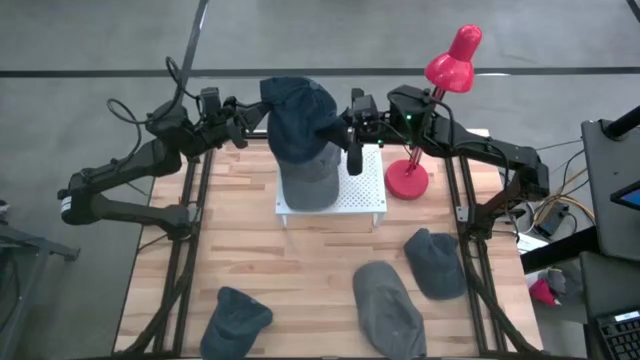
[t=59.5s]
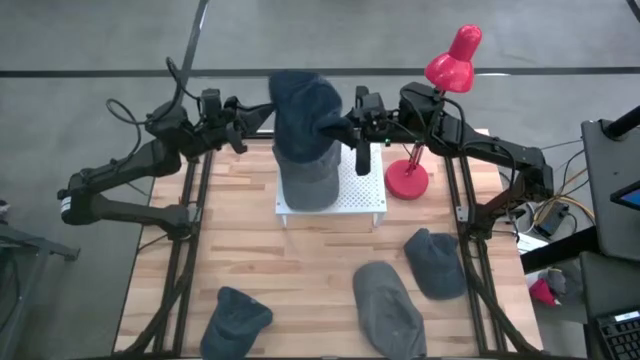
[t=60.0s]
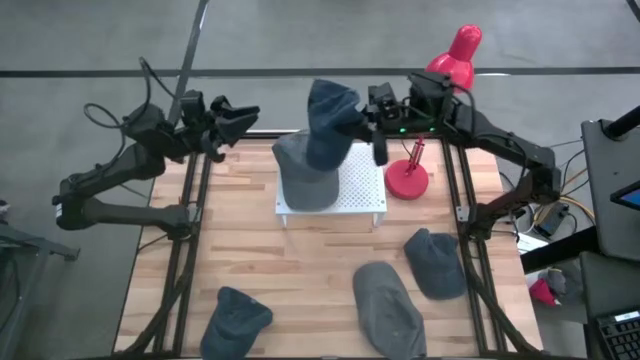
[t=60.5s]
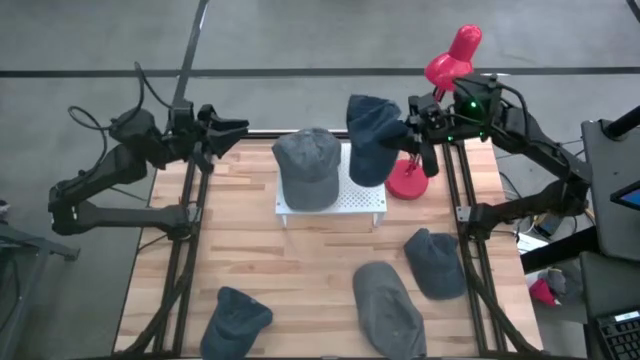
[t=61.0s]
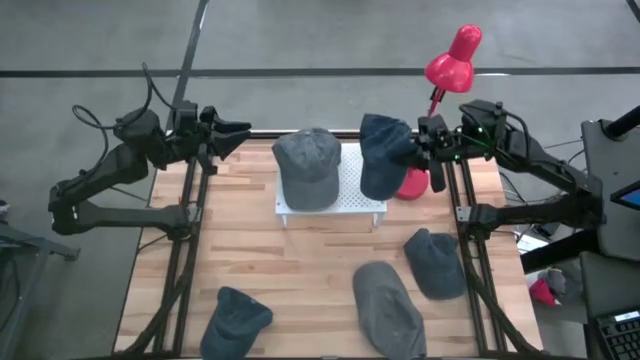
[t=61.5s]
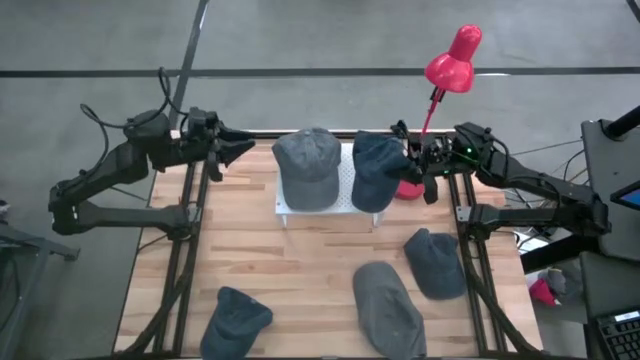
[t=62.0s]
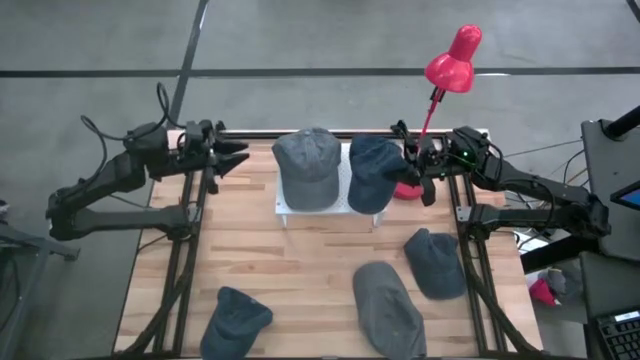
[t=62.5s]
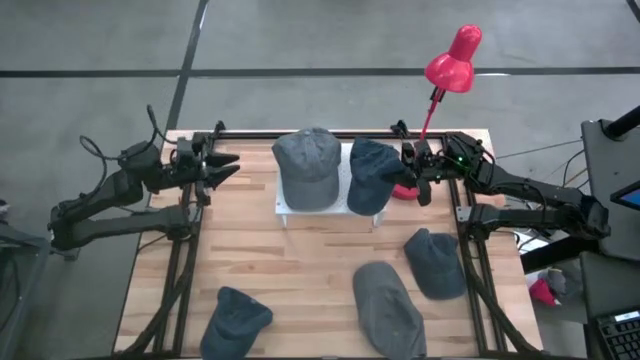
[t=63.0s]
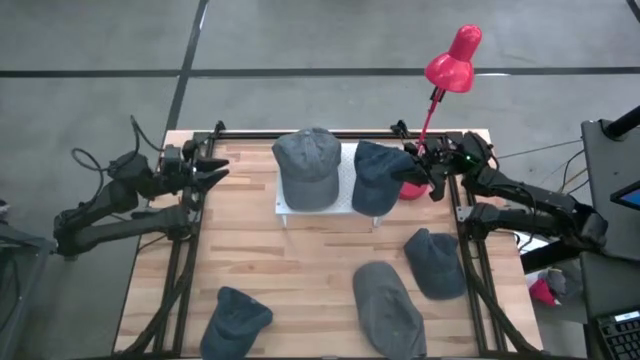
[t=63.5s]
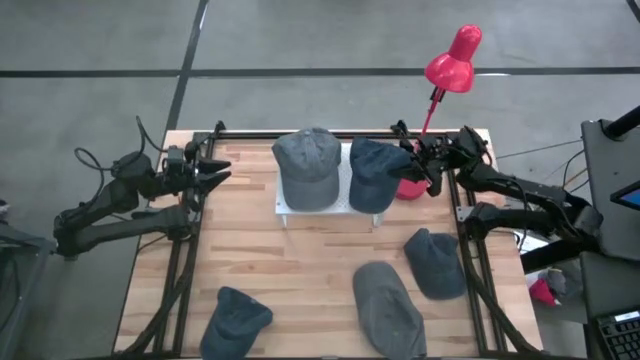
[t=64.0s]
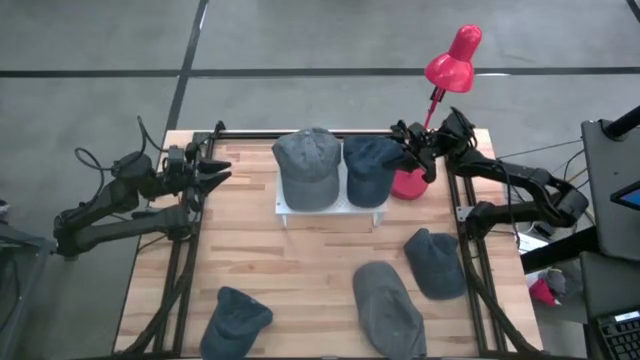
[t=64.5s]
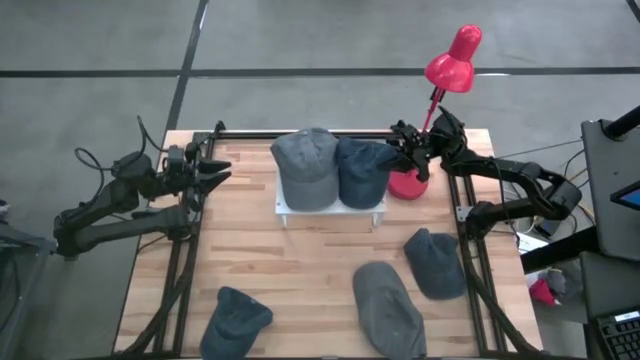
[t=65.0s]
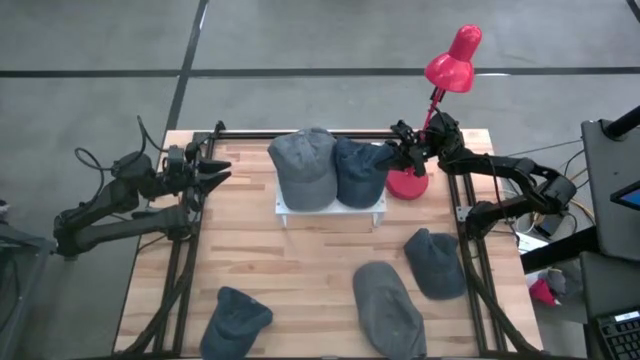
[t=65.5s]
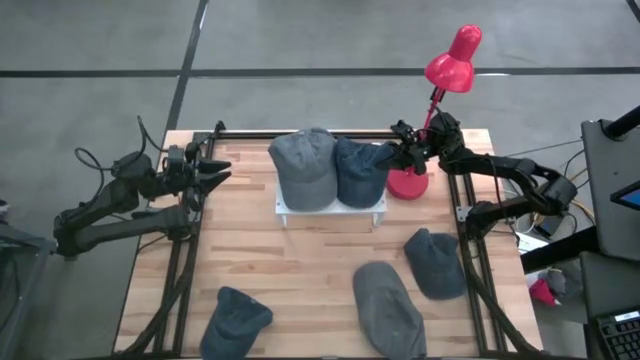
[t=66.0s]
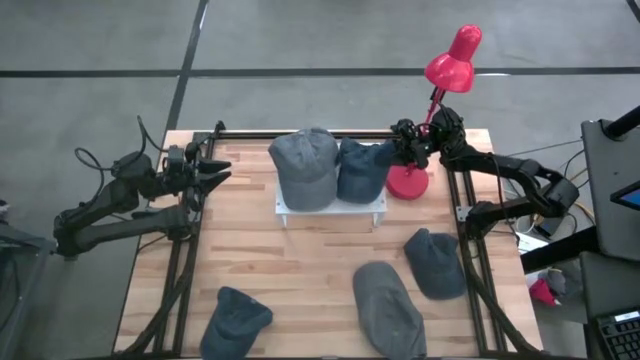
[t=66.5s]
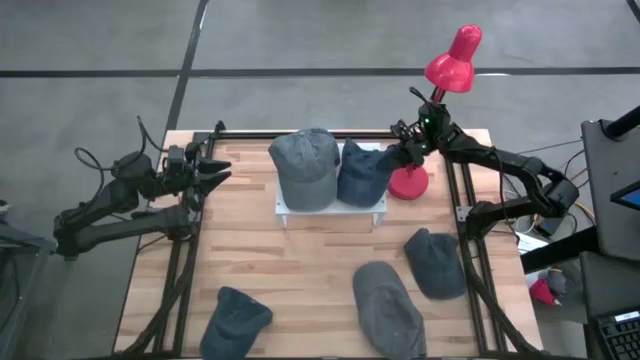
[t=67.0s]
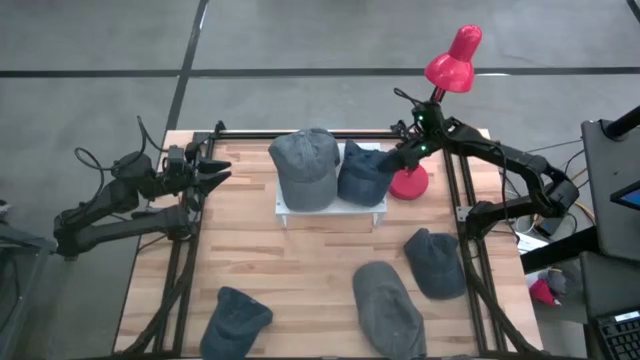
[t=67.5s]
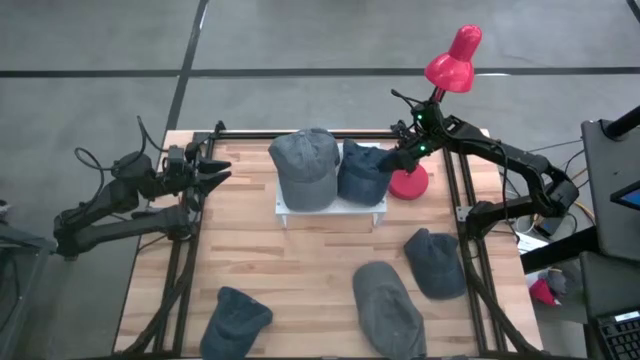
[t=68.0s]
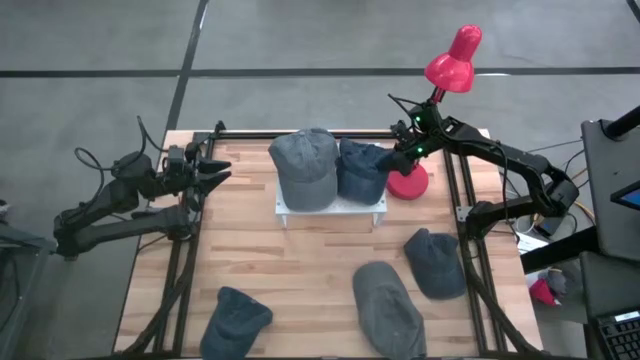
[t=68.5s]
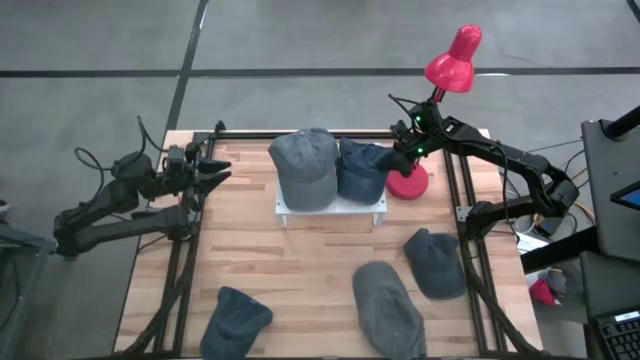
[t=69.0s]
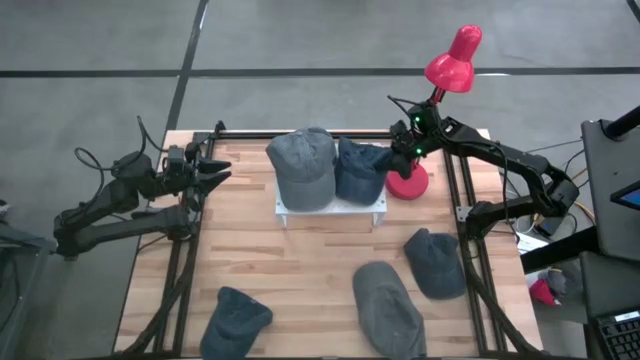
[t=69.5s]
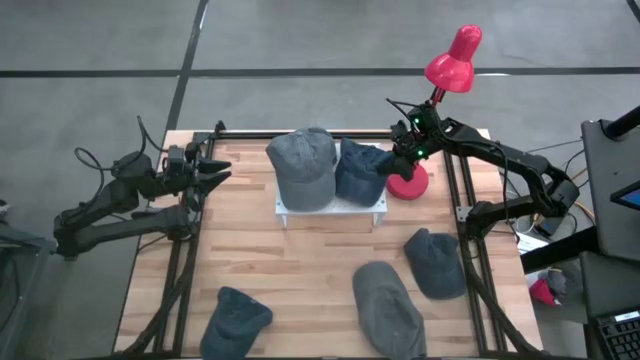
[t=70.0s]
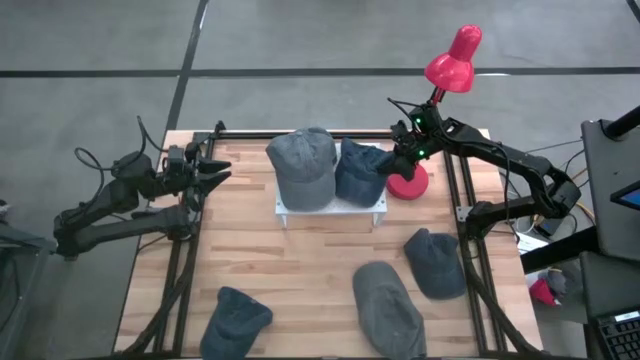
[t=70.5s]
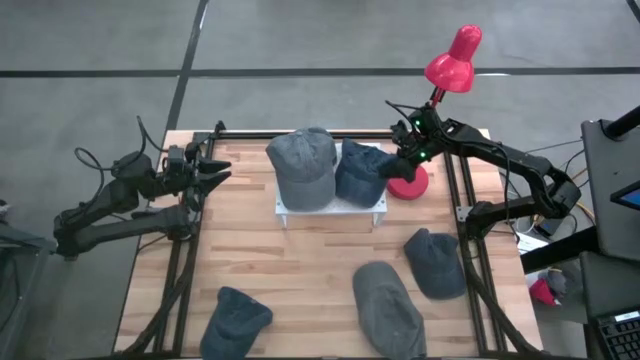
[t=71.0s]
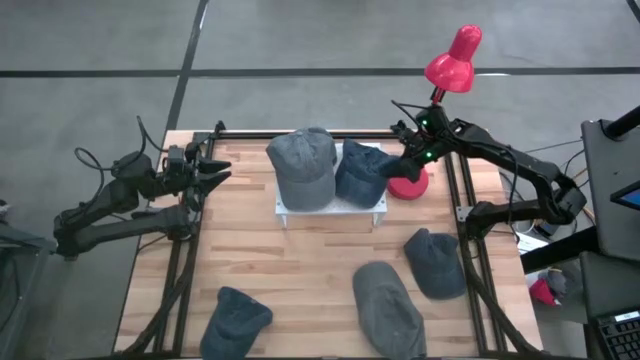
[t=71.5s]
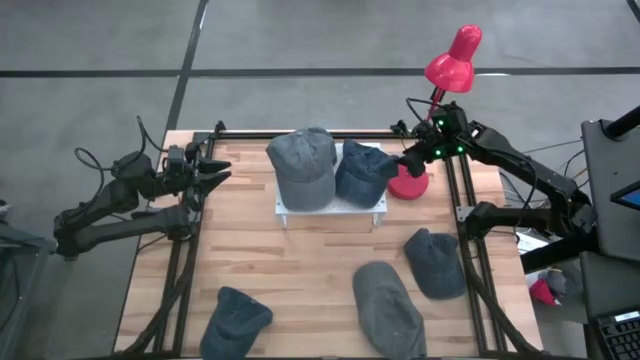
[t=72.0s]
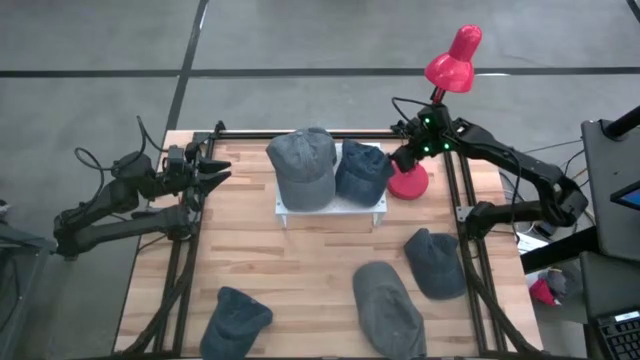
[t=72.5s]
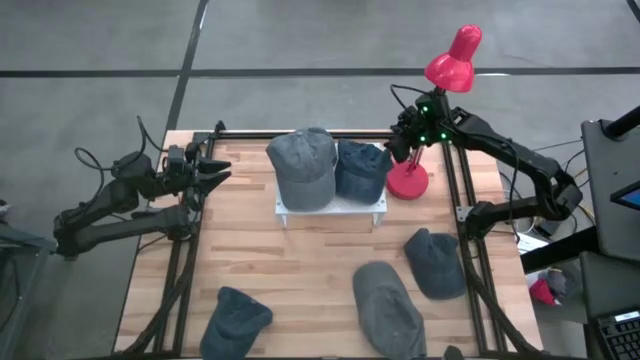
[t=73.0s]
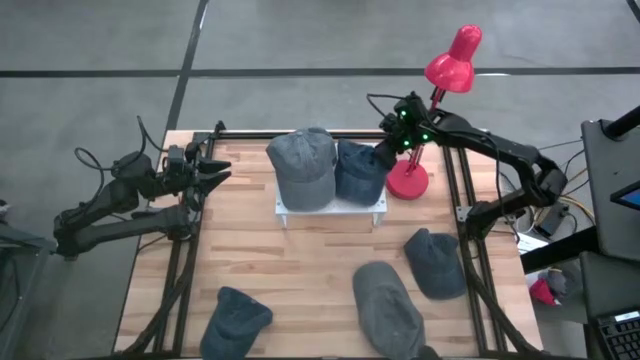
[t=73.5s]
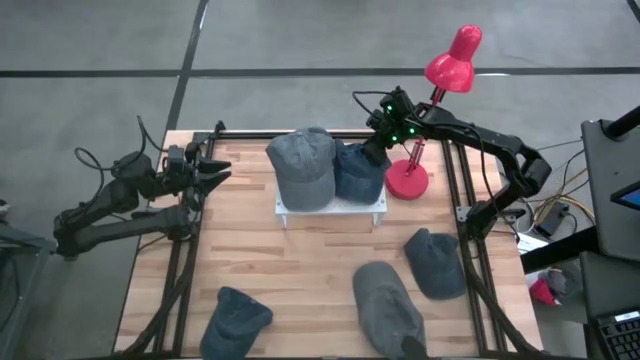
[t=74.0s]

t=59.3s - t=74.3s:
Task: Pick & Place hat
Put the top left blue cap on the shelf

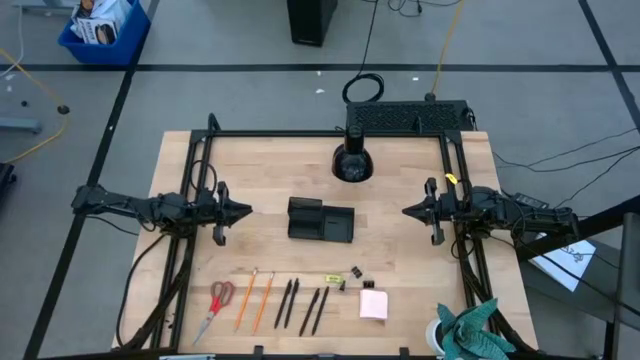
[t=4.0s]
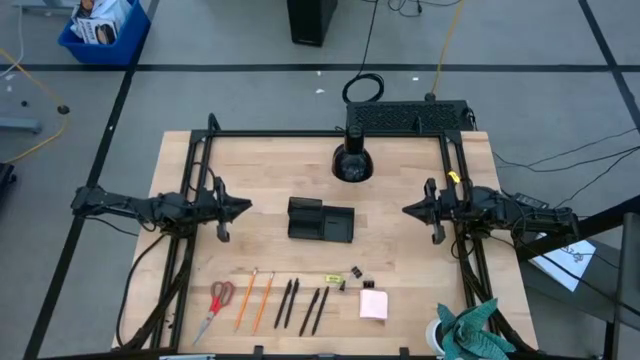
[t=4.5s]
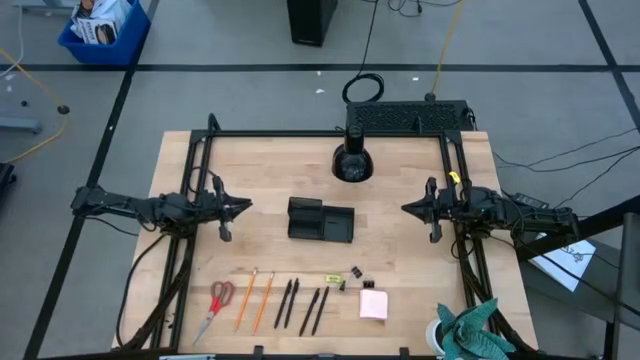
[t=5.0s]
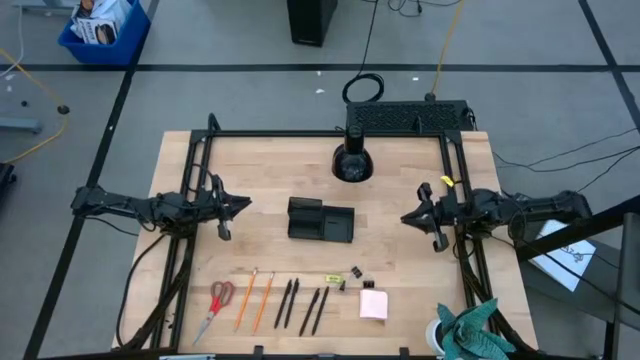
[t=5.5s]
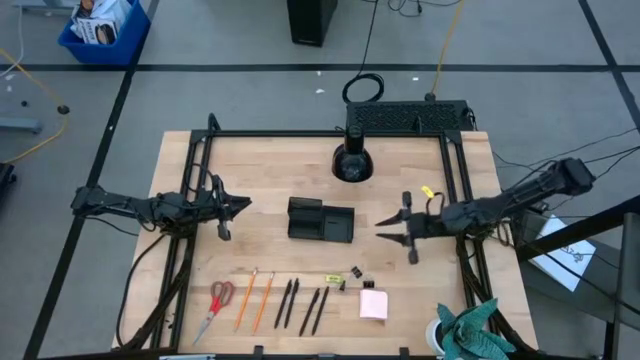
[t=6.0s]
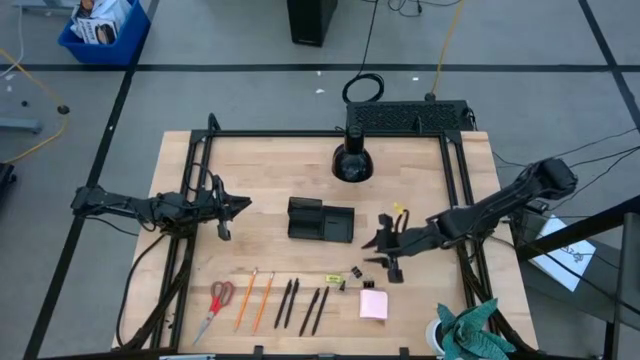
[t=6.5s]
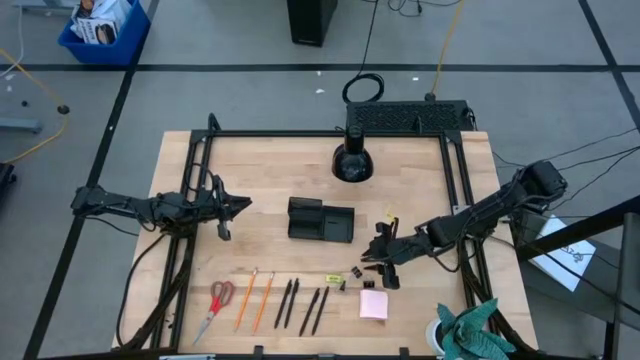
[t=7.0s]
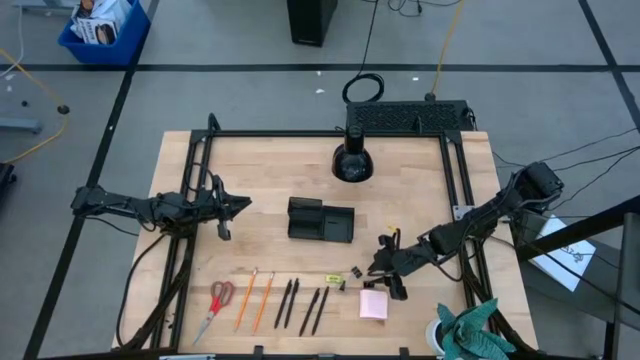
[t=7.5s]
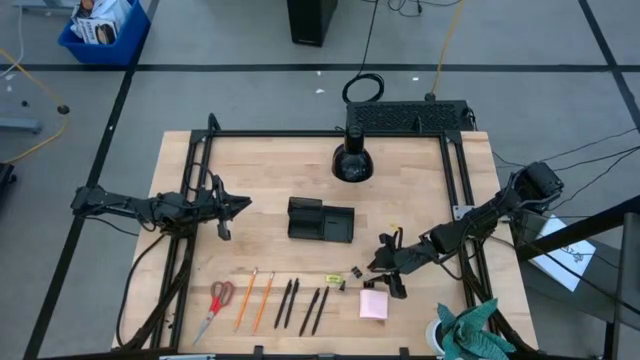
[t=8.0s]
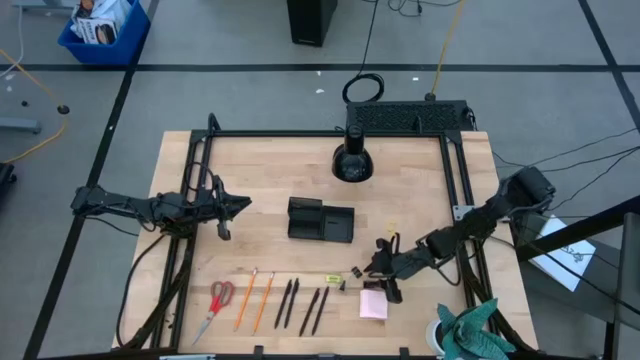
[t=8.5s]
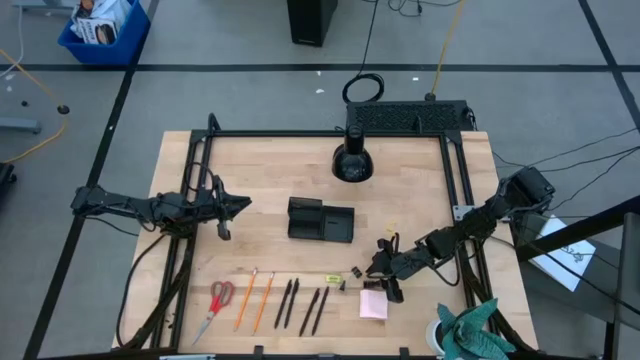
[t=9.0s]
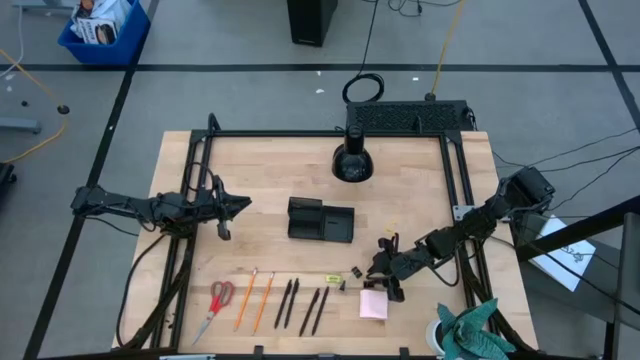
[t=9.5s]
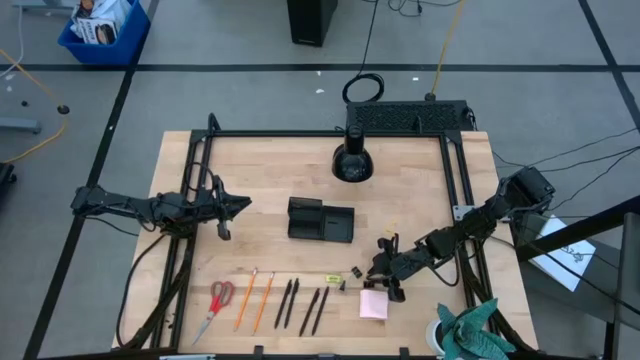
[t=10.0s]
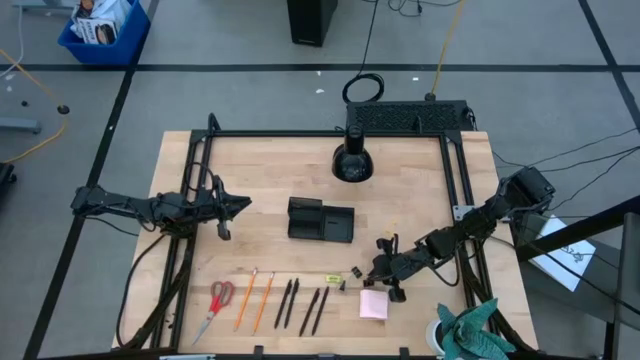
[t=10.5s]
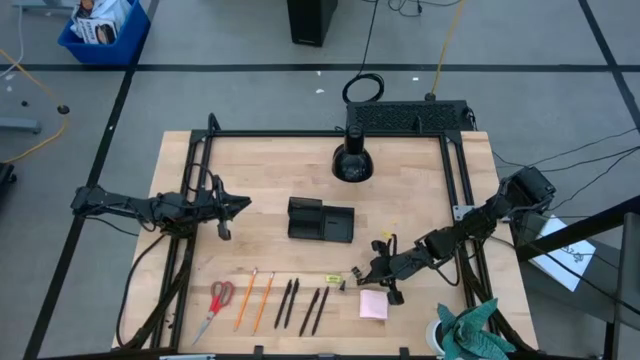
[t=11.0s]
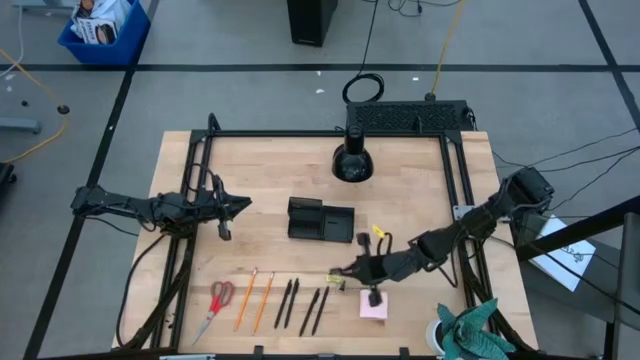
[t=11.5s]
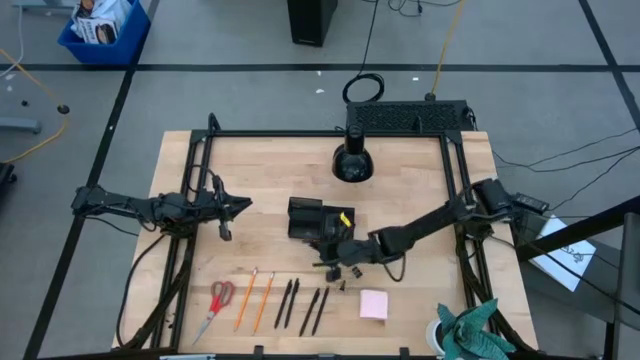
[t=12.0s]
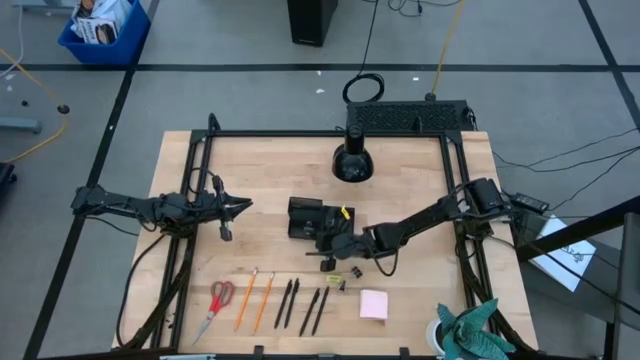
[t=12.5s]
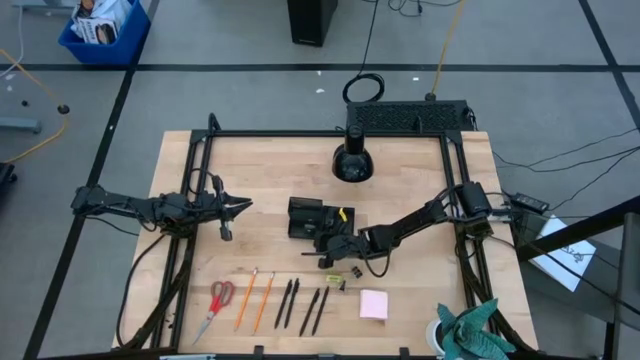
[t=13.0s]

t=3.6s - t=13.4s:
Task: Pick and place office supplies into organizer
Put the bottom right binder clip into the desk organizer
